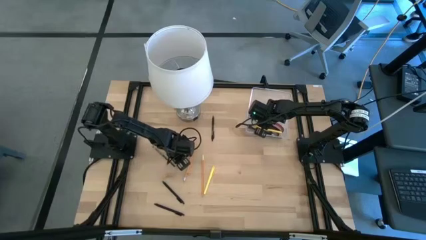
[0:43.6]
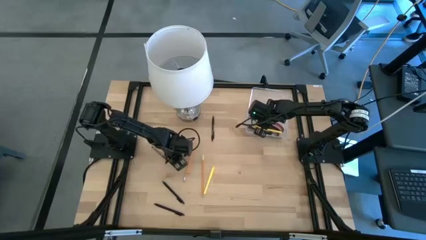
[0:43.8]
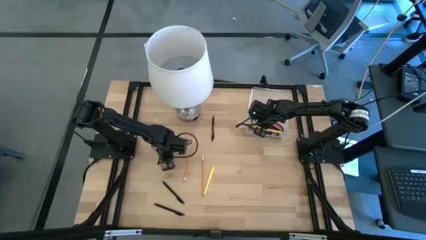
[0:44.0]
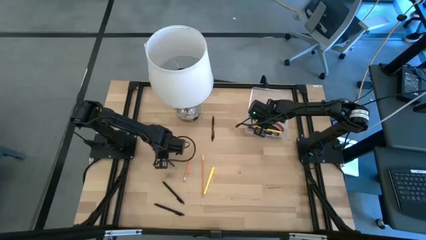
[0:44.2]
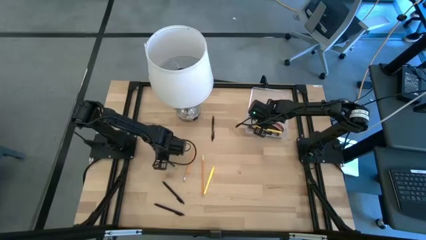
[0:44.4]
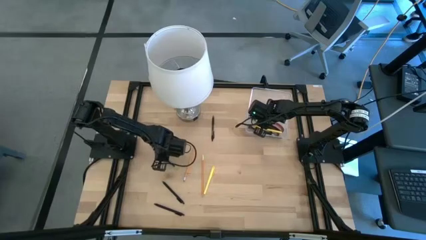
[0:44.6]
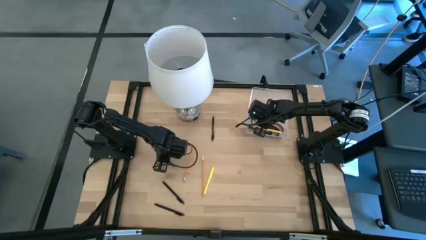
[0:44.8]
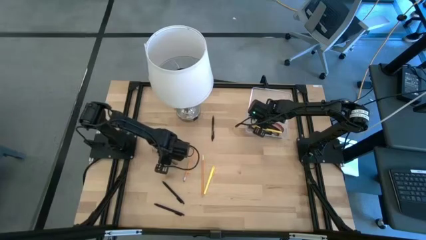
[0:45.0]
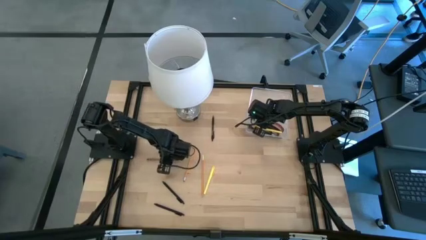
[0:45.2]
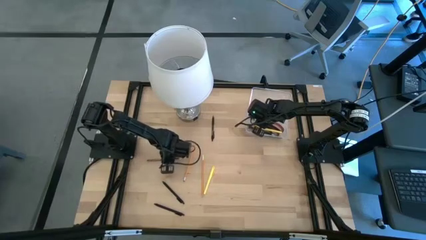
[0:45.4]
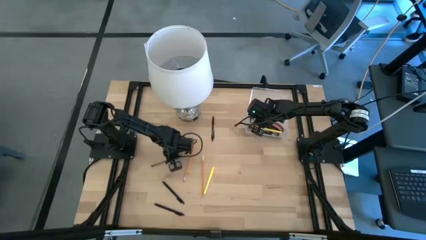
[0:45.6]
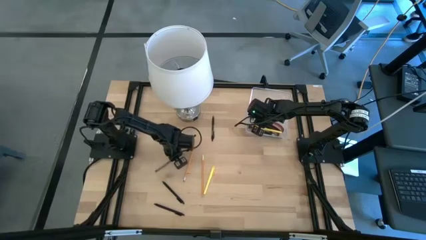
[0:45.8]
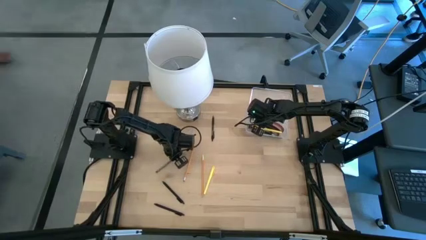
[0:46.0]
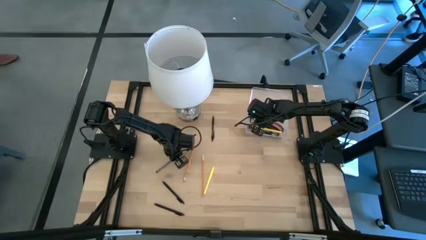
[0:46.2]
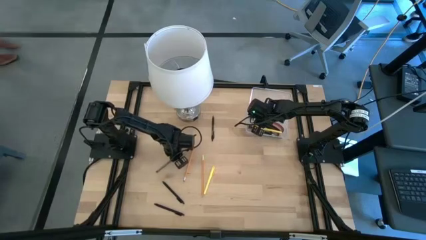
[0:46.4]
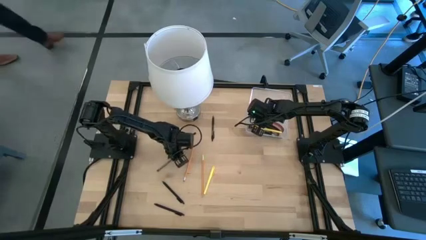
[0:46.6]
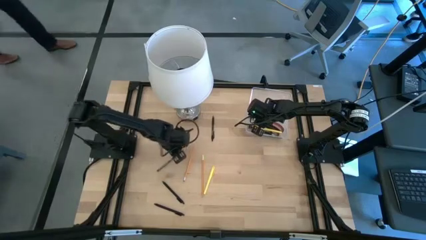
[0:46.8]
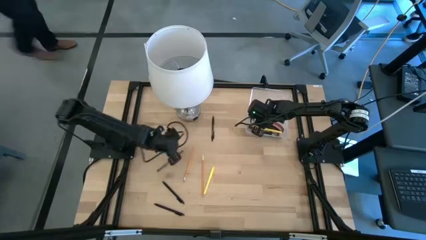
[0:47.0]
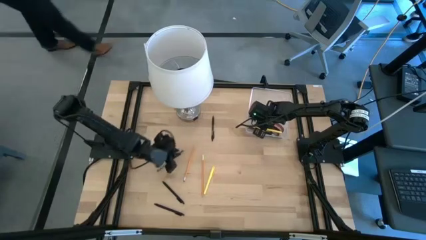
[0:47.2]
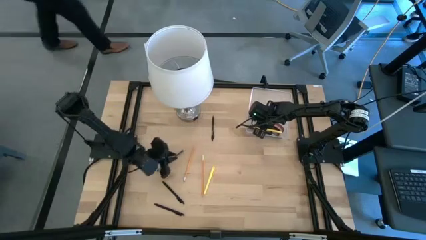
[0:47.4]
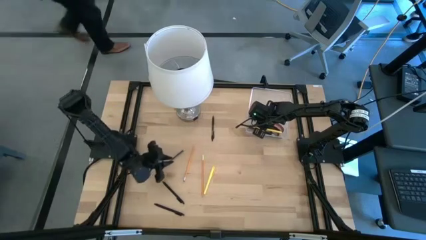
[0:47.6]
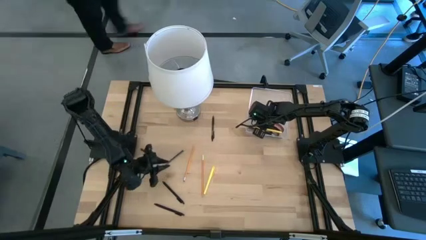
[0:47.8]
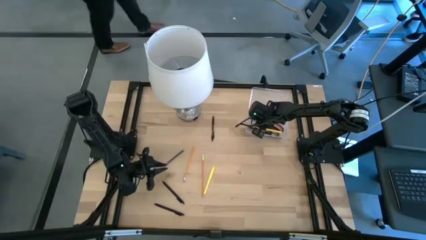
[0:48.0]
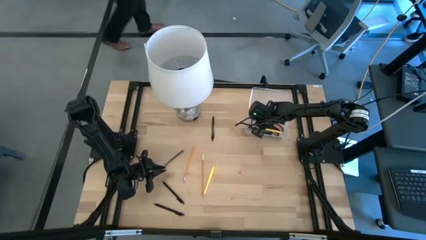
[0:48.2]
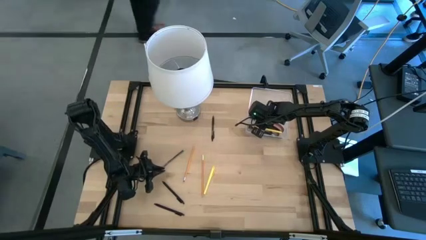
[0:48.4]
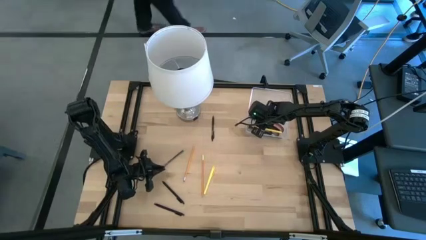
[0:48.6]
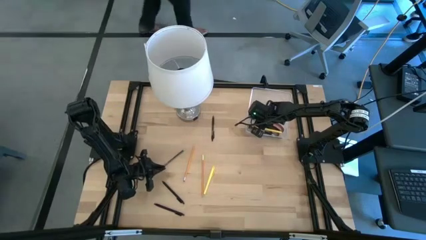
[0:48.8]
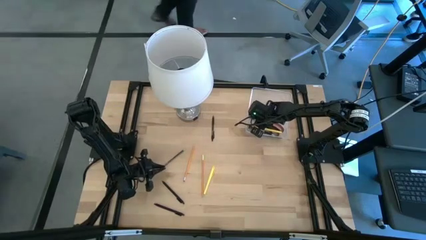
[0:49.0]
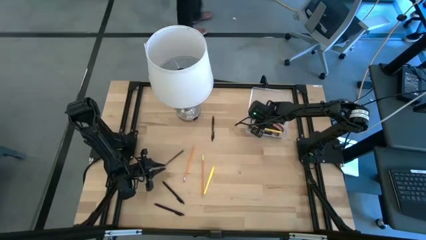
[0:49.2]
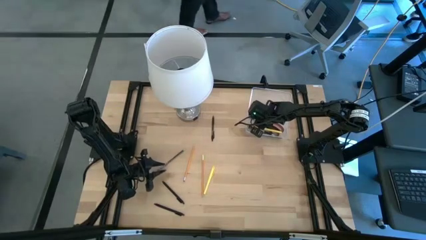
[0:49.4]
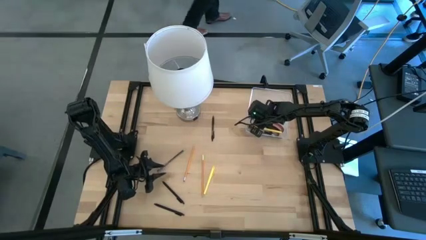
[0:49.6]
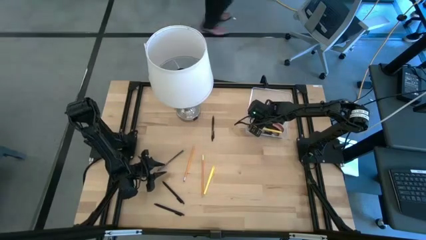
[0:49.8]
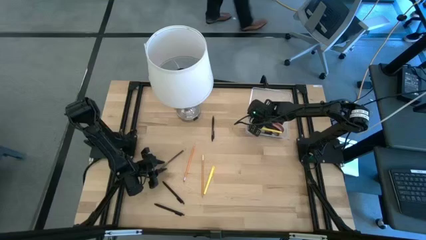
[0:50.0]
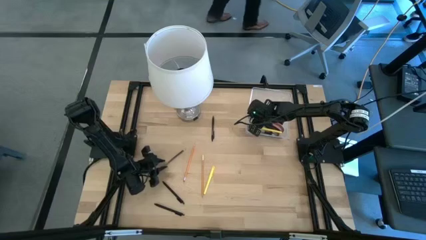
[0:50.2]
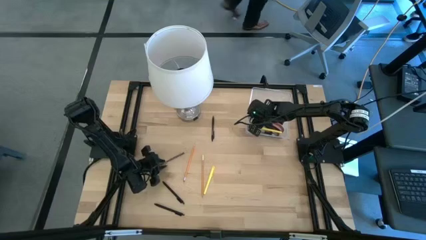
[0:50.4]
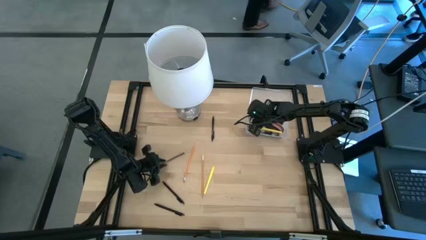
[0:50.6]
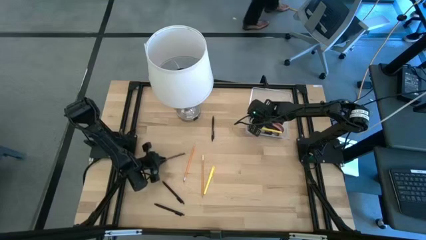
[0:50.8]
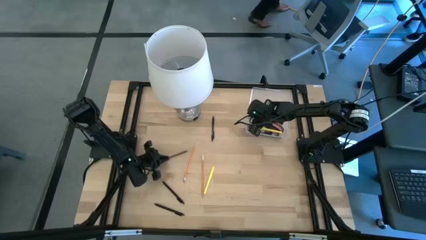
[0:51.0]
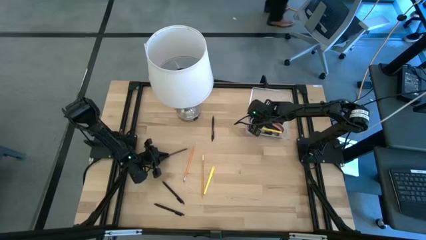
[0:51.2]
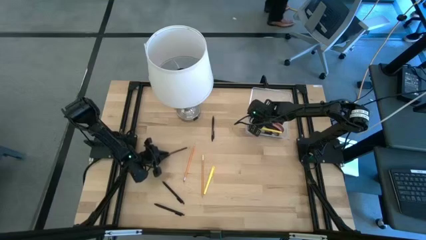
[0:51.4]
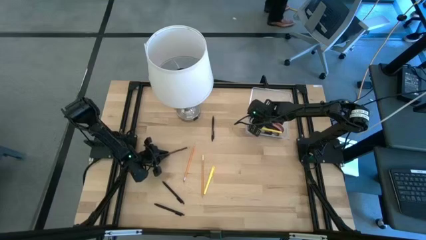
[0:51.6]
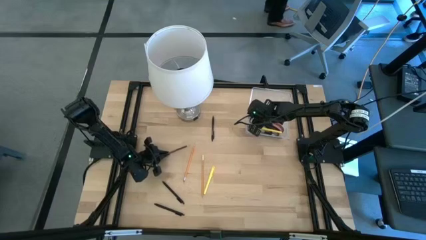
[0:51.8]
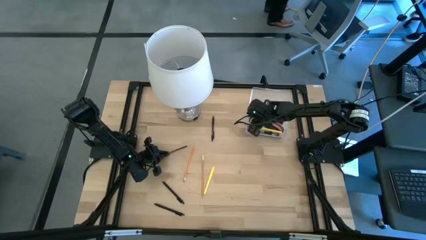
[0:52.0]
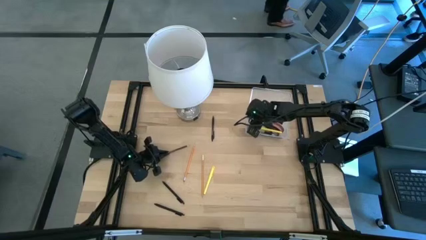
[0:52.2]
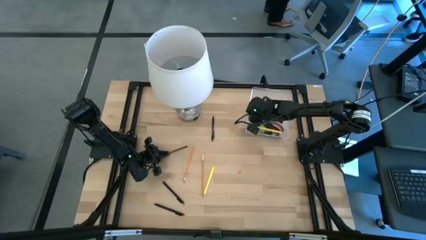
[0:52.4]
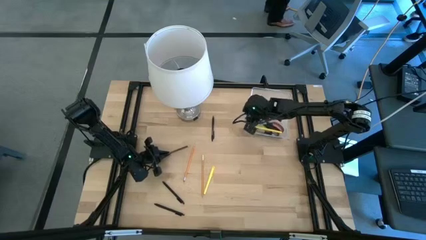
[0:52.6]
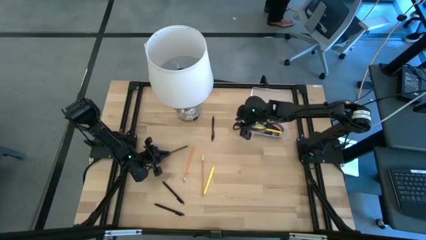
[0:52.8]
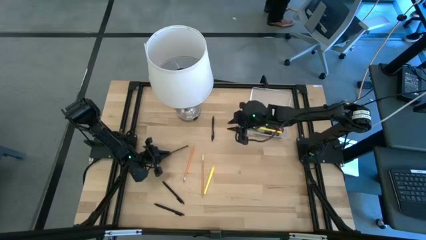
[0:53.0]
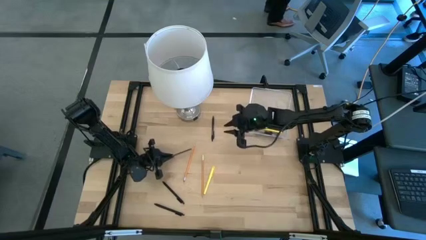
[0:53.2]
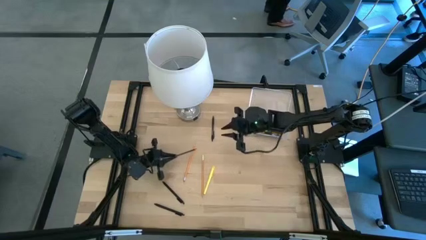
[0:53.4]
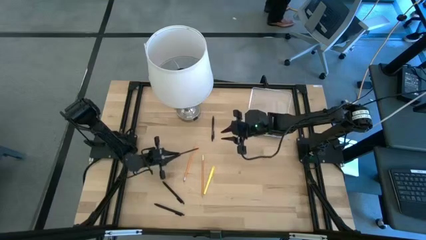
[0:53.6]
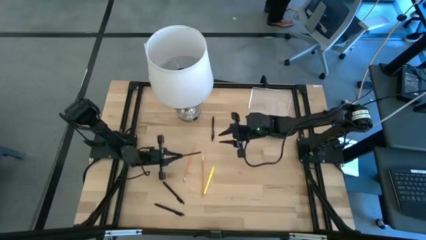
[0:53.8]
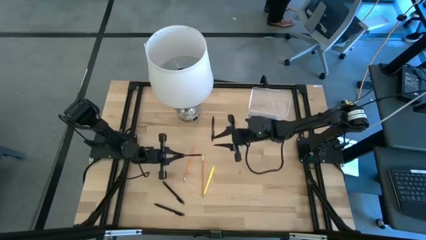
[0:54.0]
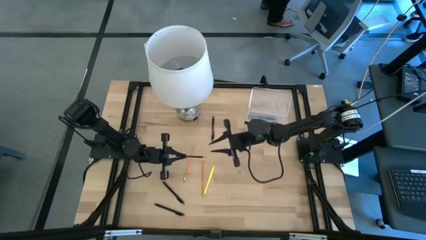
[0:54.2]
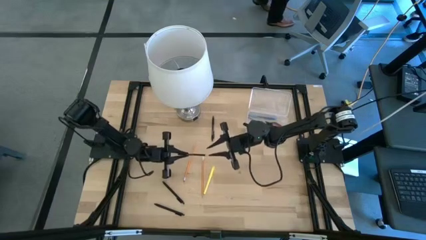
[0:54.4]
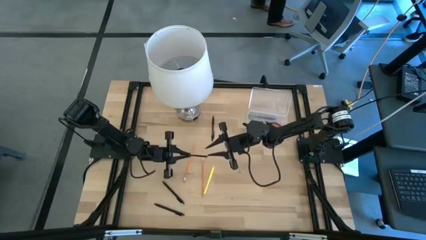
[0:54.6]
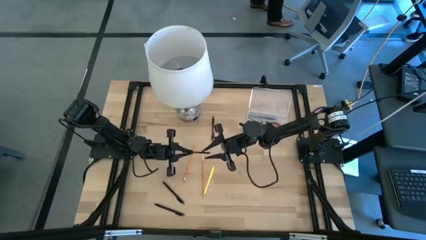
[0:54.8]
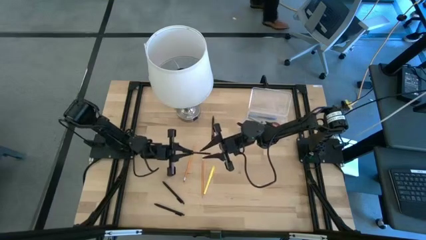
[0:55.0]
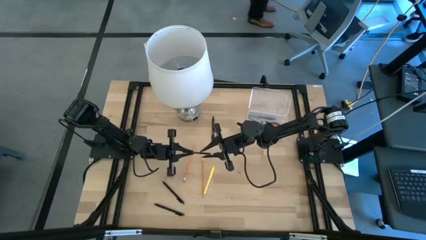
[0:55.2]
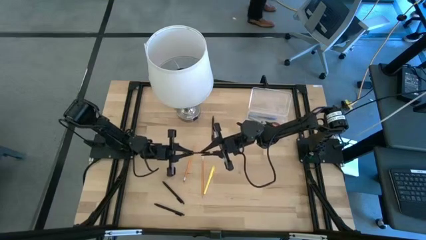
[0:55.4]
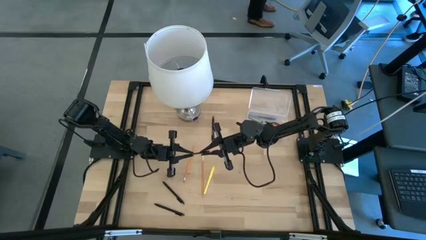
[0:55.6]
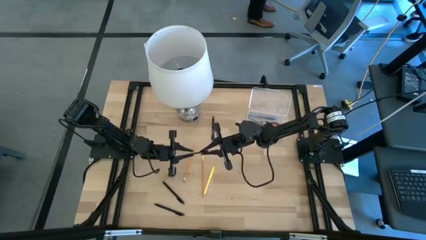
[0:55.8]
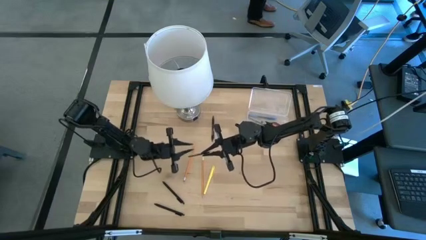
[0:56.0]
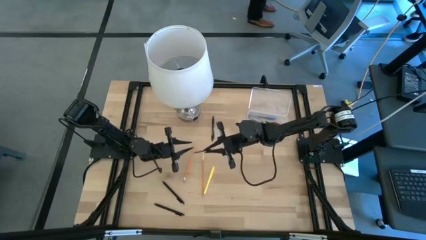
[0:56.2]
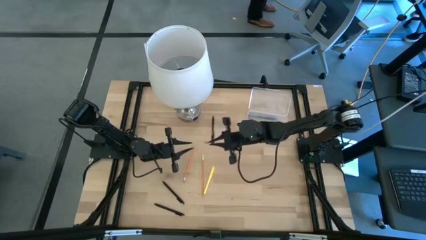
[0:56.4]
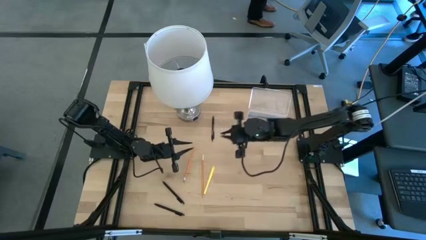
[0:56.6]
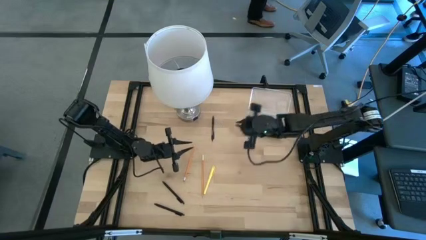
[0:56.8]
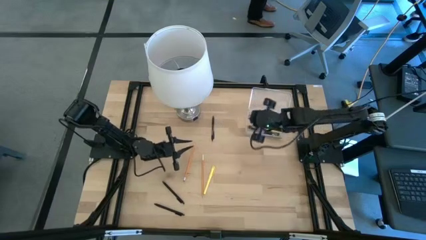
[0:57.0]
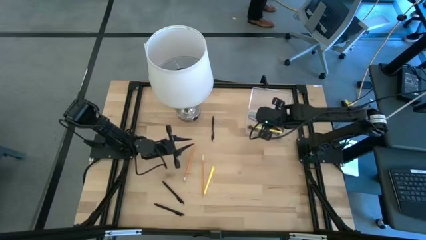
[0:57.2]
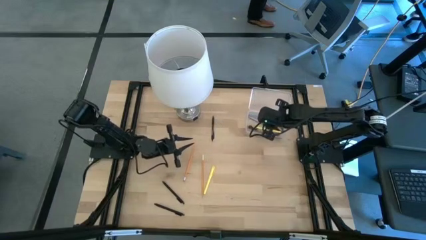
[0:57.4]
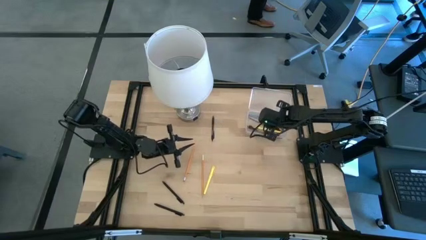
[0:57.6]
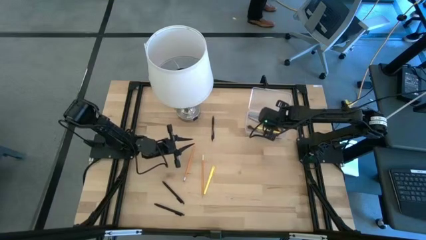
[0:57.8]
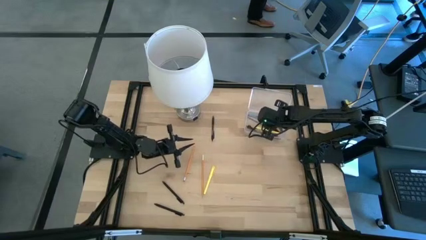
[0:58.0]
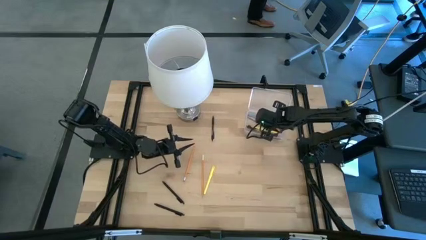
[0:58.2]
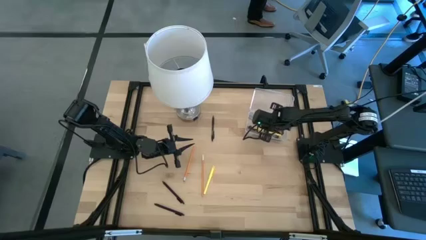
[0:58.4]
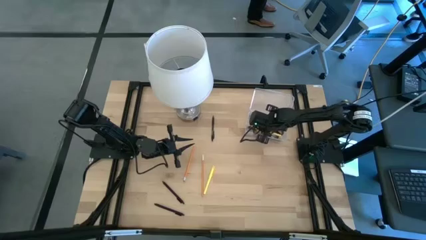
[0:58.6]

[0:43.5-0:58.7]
Task: Pick & place school supplies into a supply box
Put the black pencil into the transparent supply box

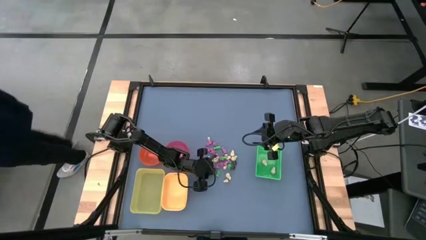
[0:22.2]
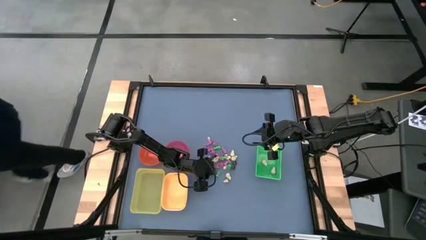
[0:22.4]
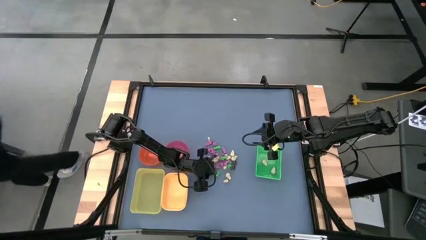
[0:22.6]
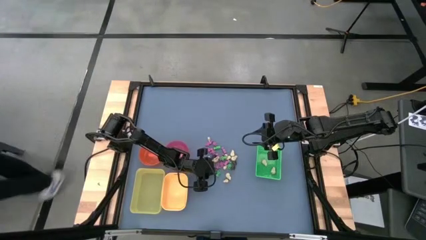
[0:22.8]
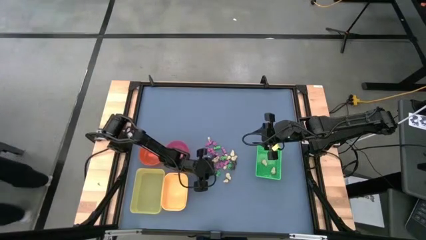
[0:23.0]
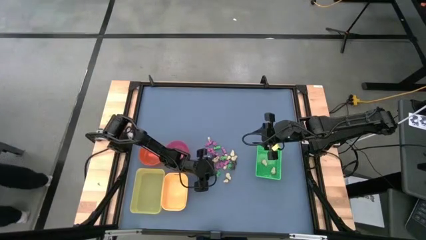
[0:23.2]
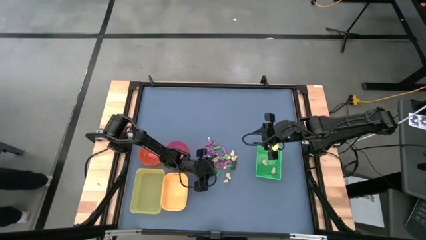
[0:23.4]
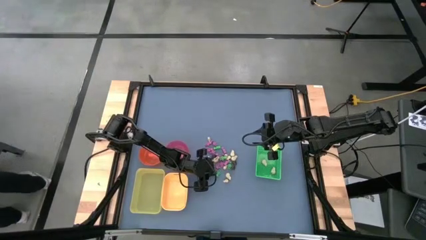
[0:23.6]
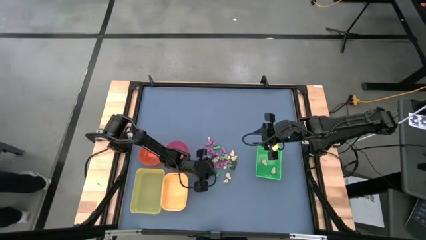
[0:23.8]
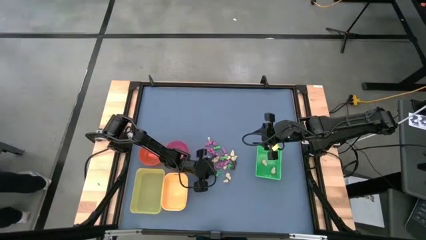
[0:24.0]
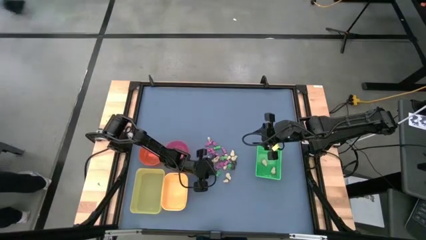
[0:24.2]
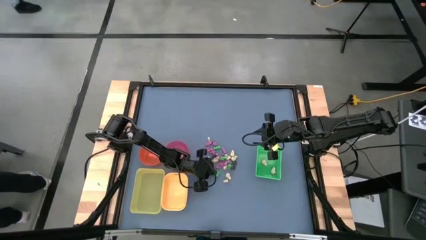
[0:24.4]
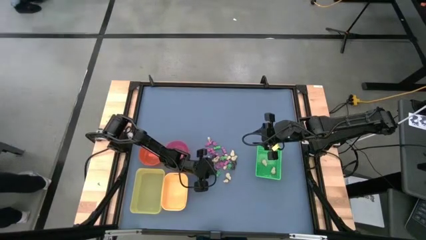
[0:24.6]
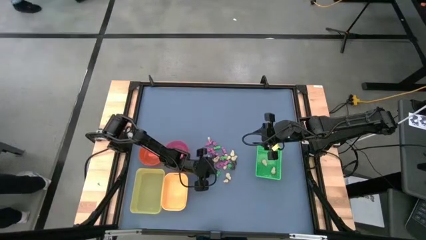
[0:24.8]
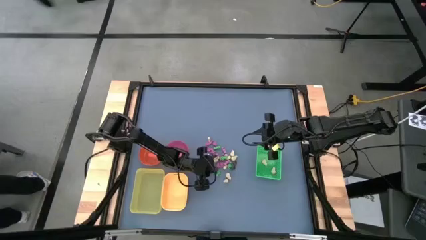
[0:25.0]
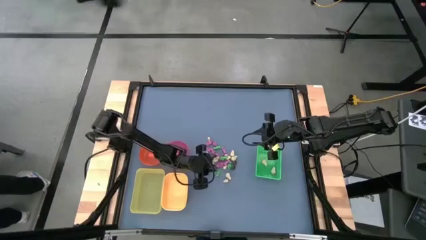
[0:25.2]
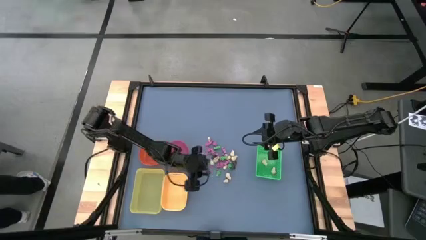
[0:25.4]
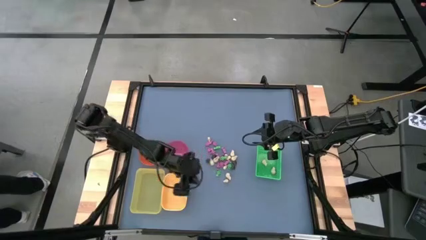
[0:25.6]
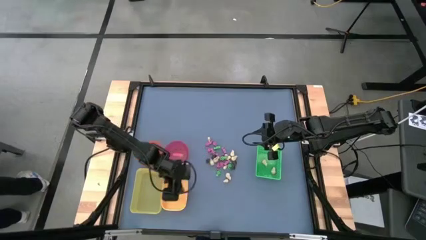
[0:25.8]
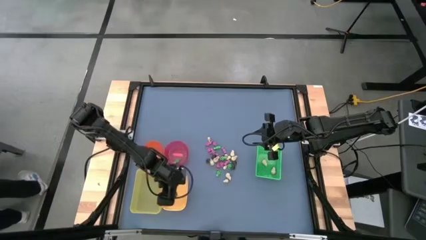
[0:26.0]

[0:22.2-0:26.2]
Task: Sort Halloween decoration
Put the black skull toy into the yellow bin
